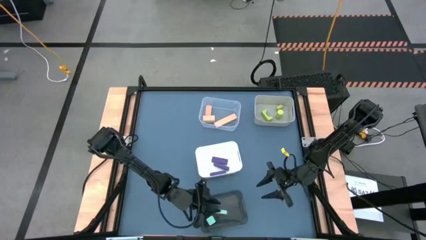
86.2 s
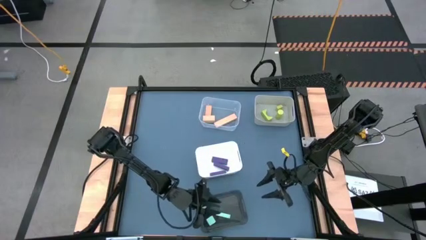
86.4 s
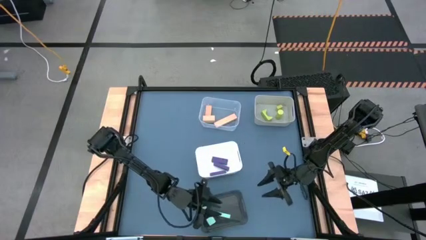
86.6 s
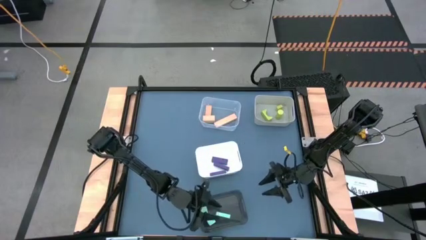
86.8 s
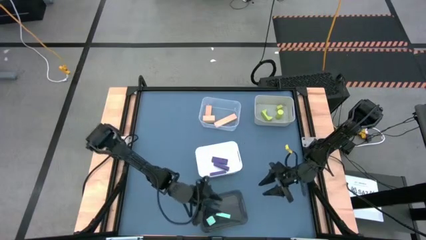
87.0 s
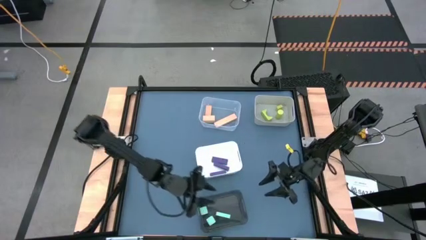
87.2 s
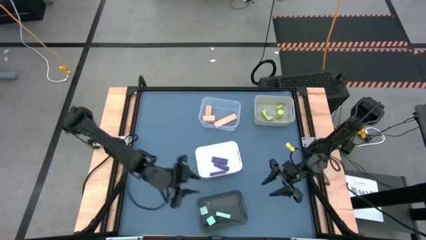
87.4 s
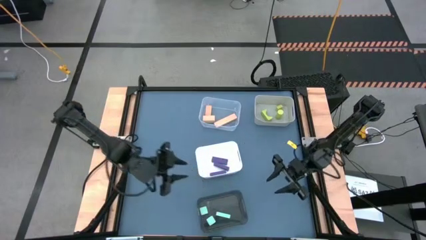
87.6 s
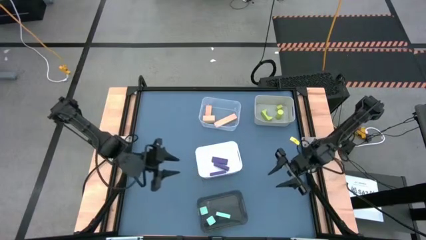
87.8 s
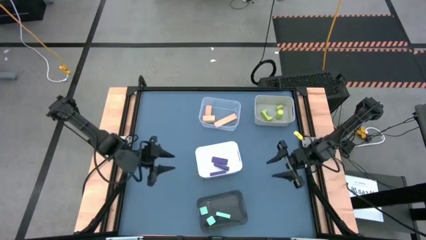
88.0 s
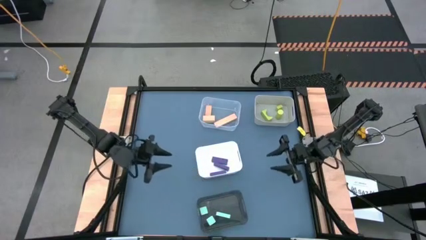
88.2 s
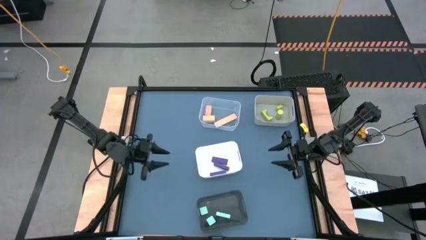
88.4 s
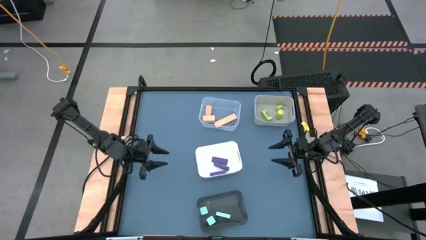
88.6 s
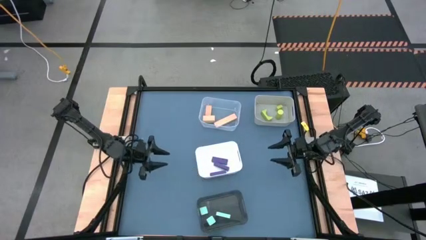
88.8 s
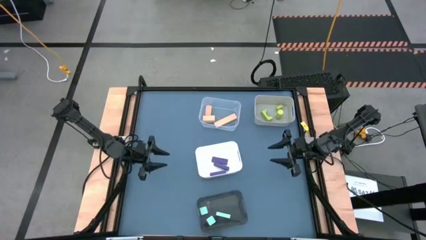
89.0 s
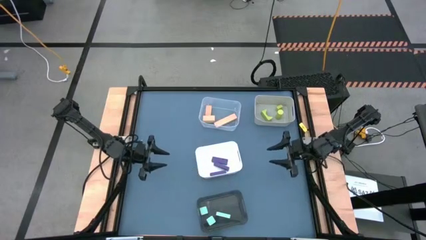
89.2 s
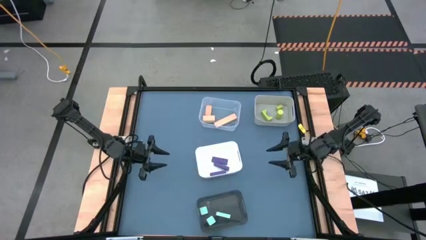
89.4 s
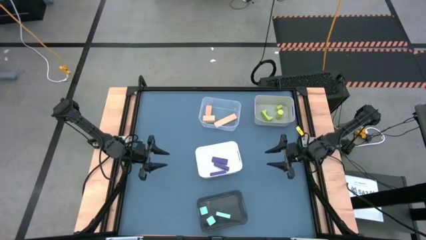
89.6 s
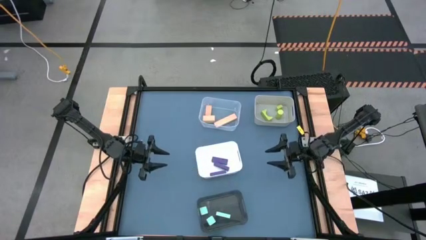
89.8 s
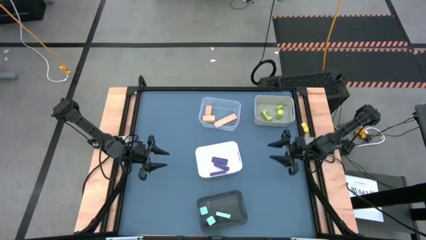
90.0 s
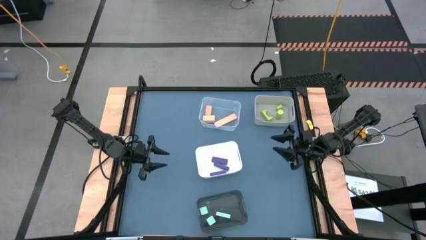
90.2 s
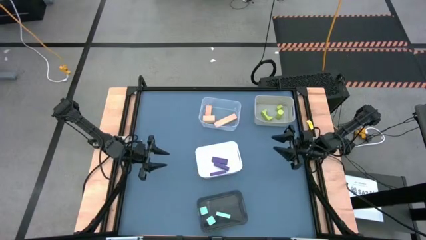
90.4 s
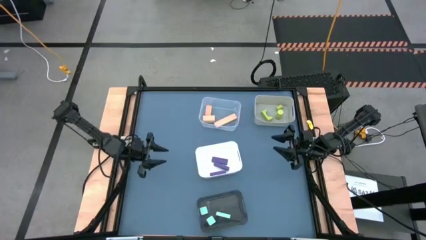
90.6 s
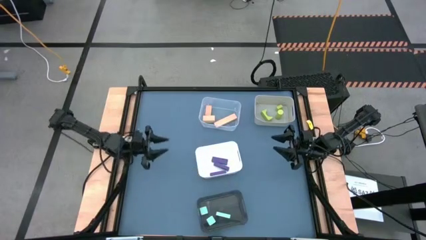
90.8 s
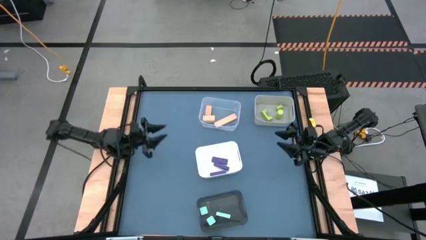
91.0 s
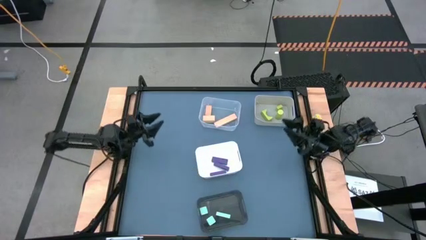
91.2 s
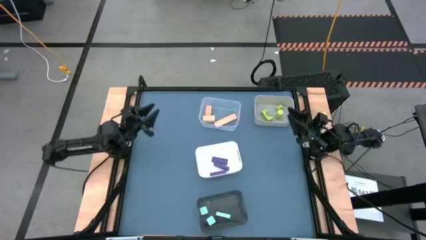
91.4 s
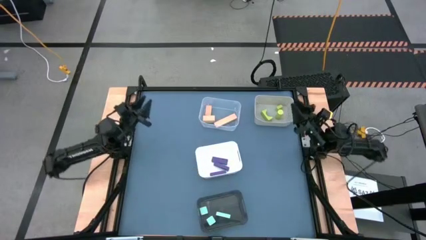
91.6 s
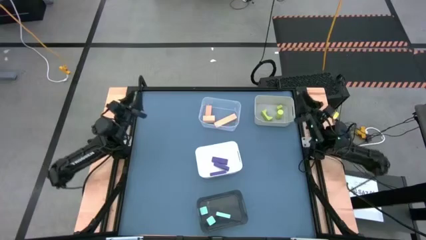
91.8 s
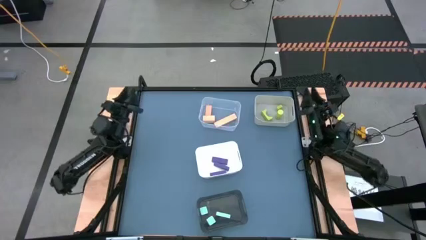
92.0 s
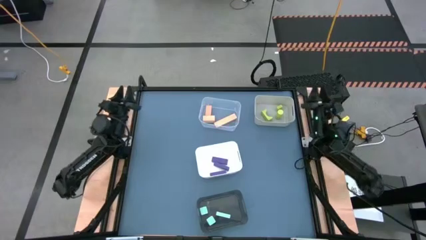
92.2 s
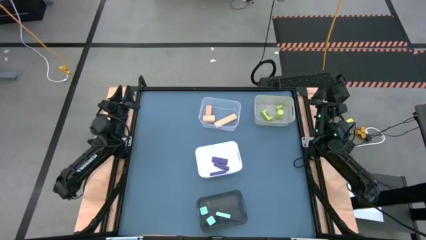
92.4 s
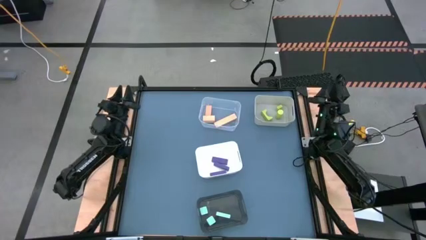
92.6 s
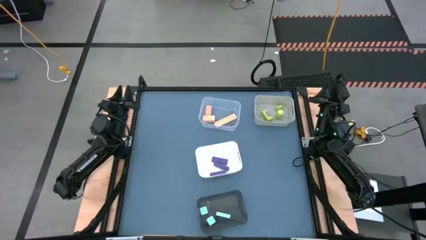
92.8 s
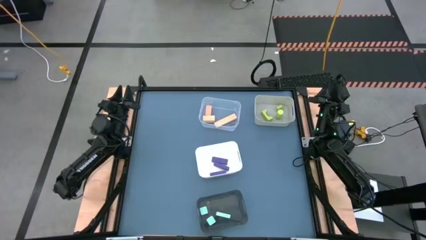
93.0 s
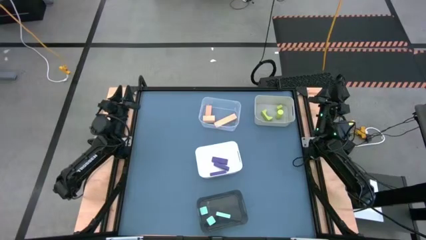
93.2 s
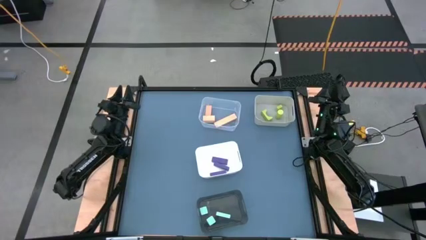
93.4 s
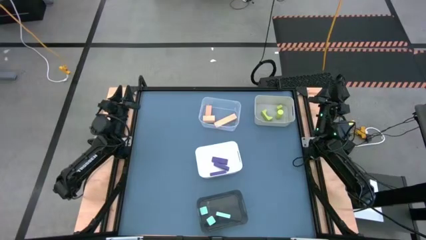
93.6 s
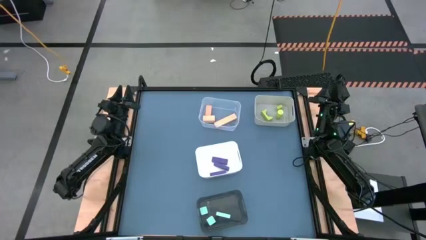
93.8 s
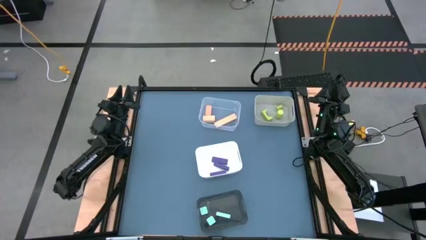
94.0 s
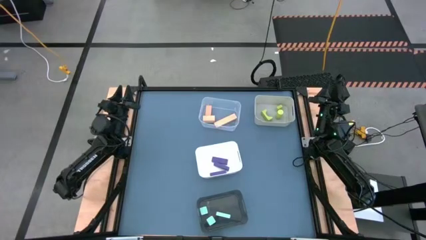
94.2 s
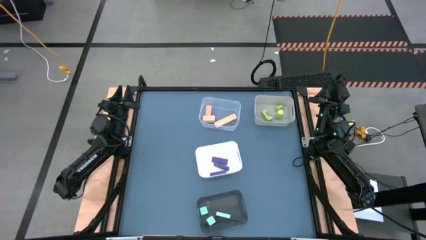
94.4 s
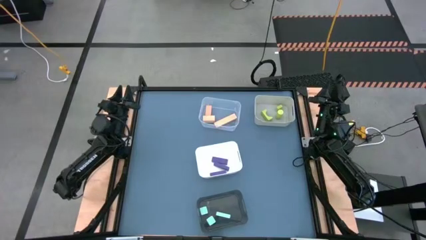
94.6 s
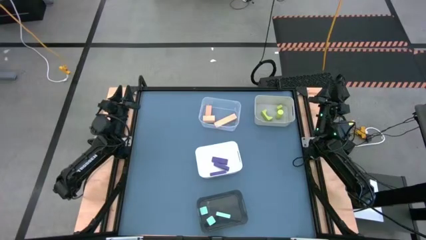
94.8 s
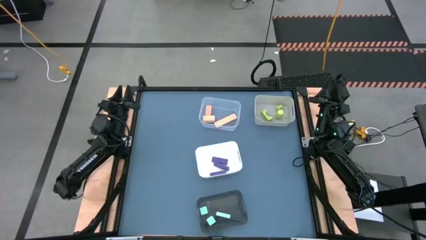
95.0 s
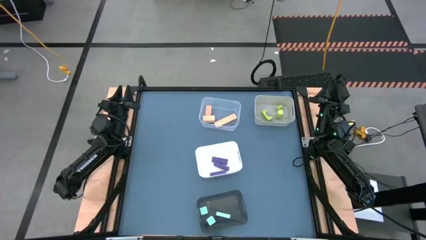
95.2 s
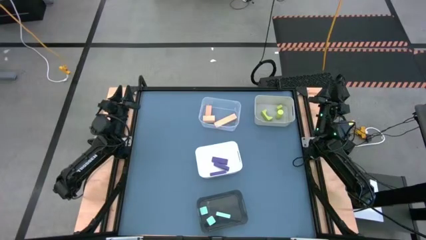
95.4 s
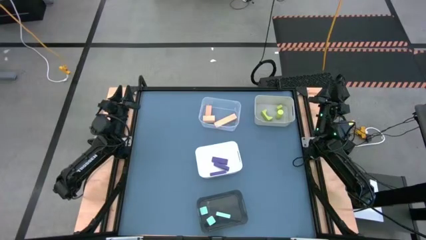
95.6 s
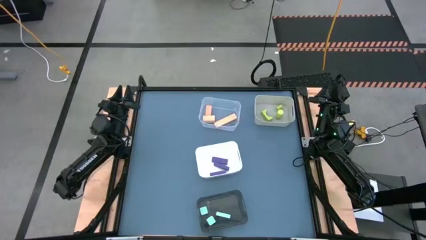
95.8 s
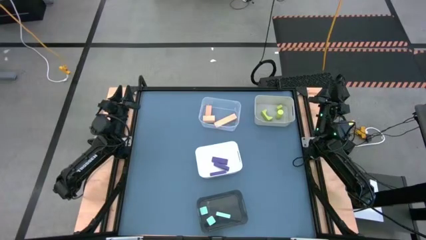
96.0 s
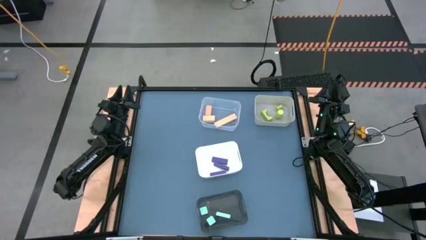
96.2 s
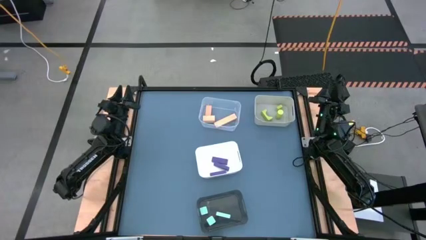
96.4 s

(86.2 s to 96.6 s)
Task: Sort & place blocks by color
Return to Home Position

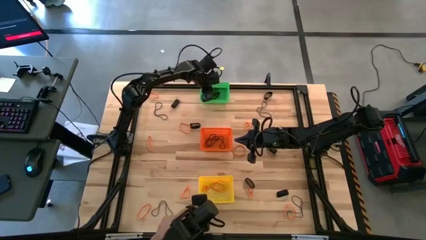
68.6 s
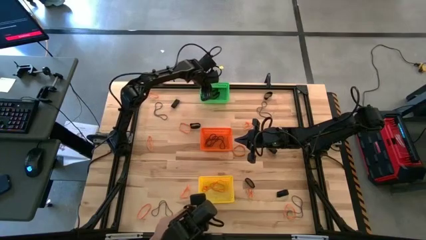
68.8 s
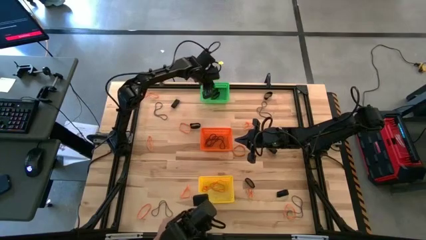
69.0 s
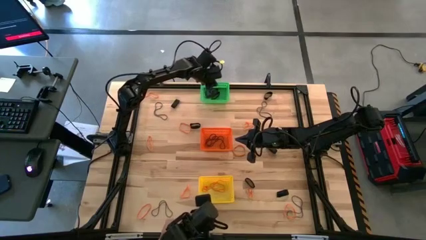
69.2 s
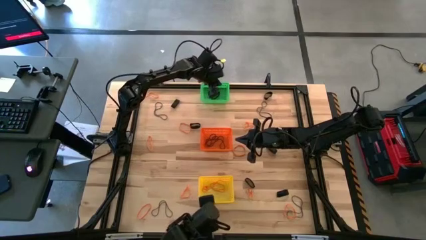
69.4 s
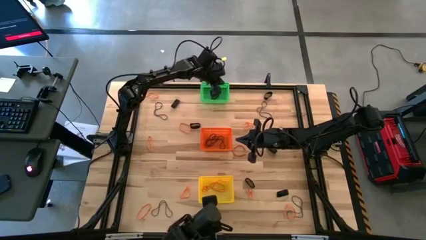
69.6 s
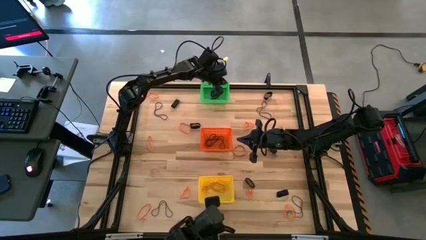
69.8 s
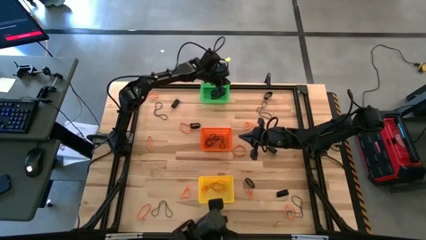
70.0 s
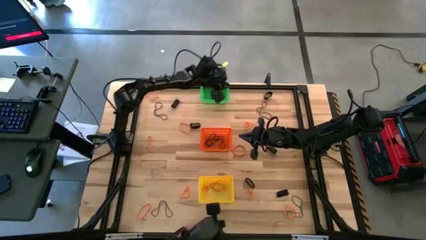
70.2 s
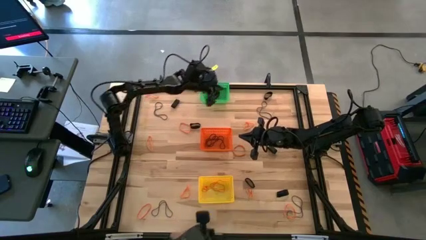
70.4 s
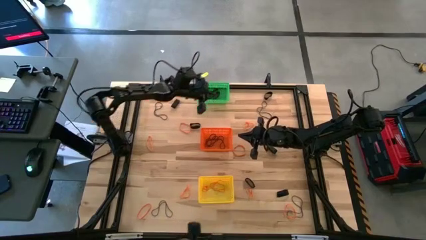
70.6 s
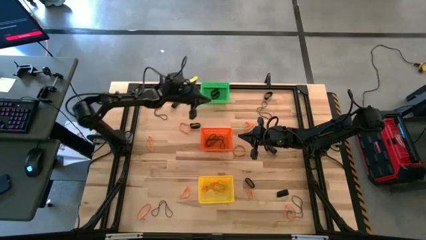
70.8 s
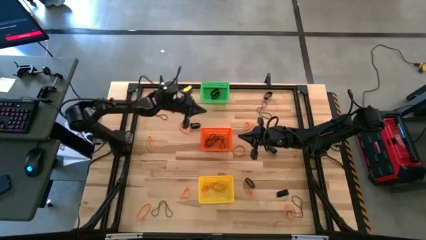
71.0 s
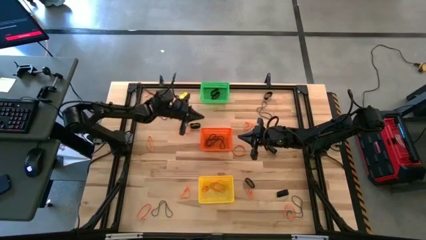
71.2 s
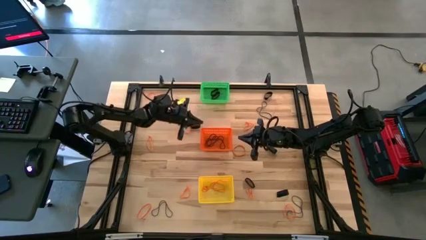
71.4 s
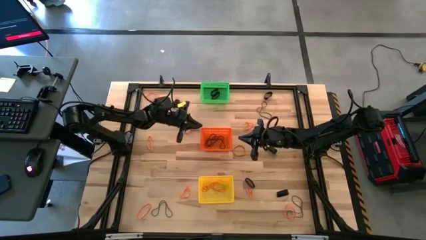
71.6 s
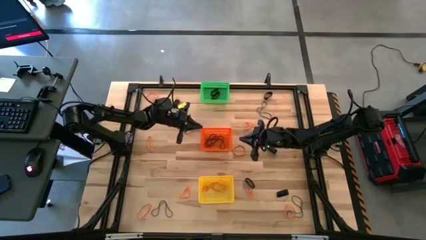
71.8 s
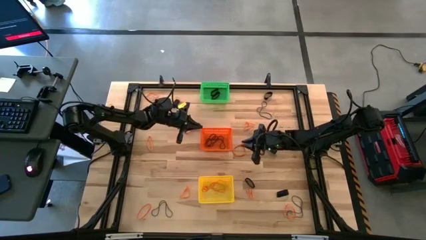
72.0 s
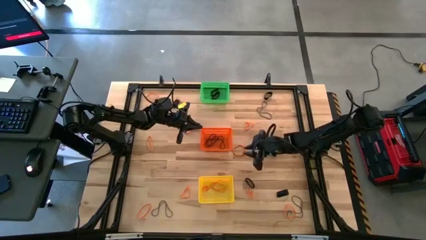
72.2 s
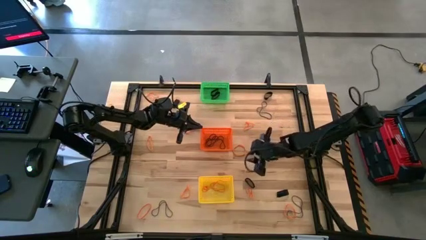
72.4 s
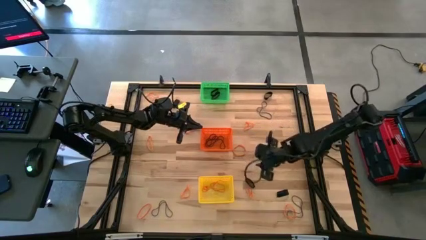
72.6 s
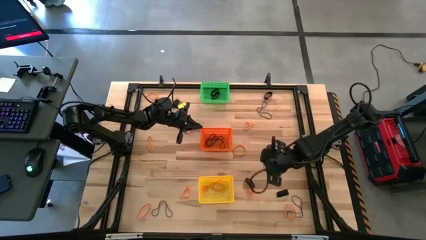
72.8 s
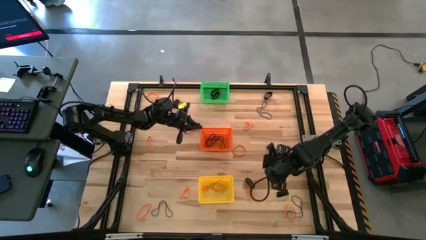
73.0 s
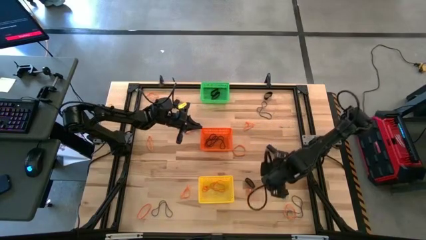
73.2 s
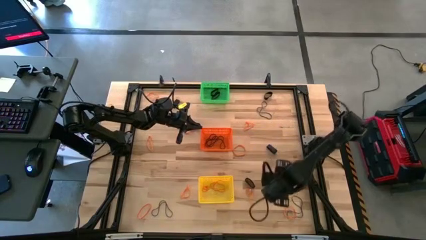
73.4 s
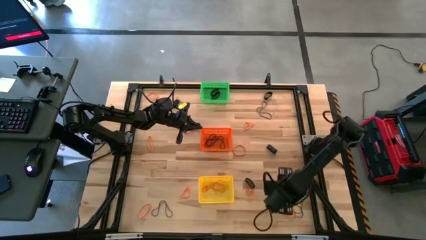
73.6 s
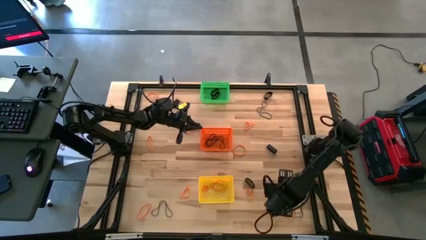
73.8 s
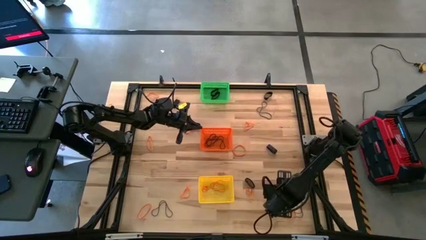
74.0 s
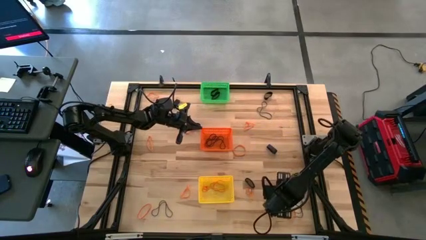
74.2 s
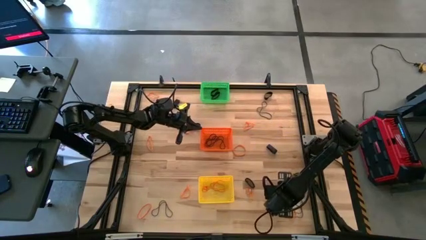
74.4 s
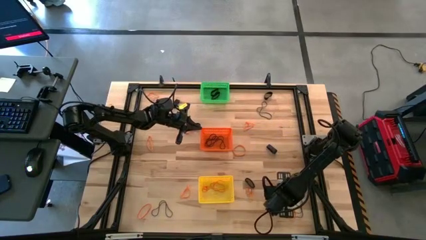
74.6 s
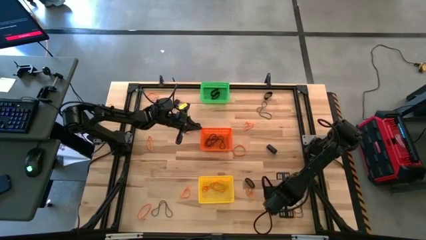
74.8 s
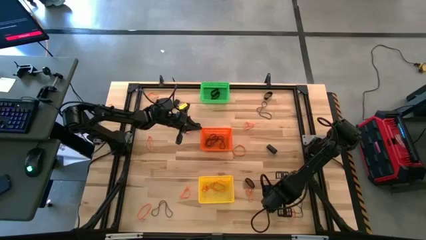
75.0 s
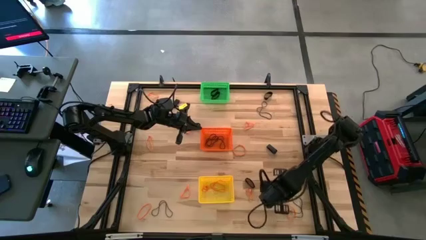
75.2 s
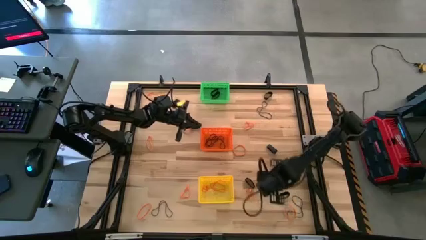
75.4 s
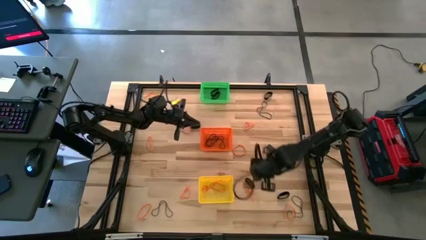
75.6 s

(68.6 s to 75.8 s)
Task: Sort rubber bands into baskets
Put the black rubber band into the green bin
